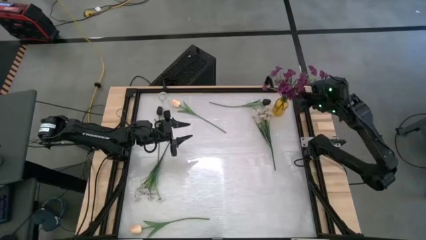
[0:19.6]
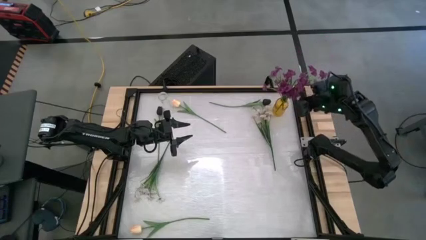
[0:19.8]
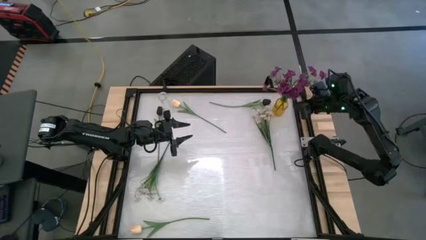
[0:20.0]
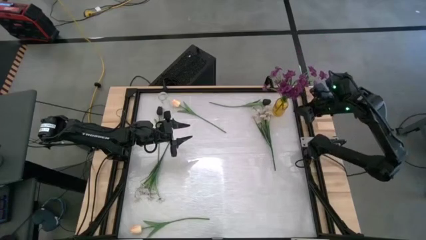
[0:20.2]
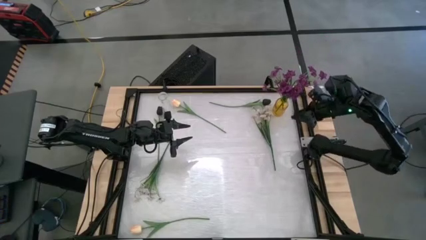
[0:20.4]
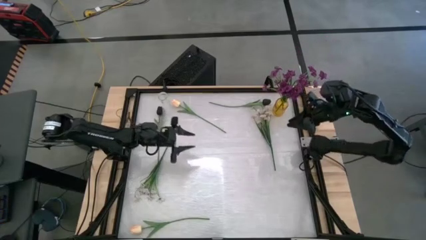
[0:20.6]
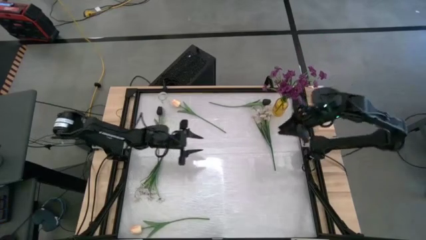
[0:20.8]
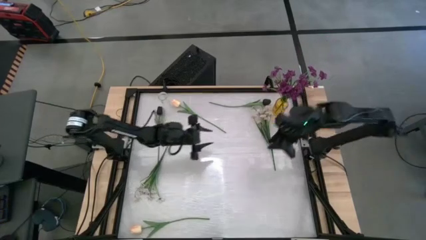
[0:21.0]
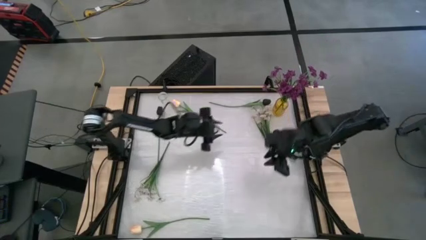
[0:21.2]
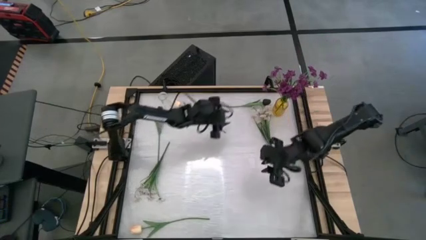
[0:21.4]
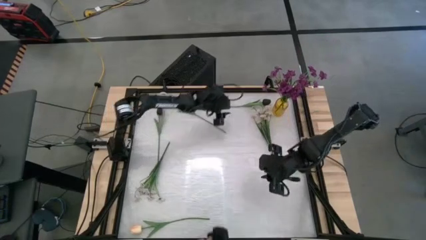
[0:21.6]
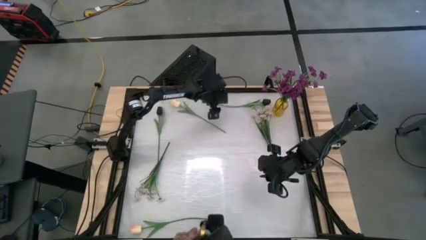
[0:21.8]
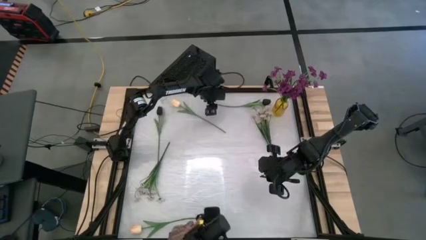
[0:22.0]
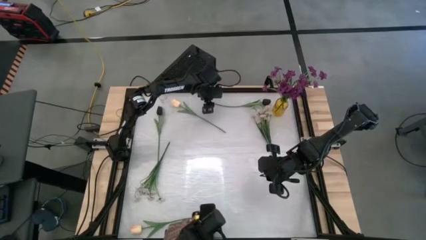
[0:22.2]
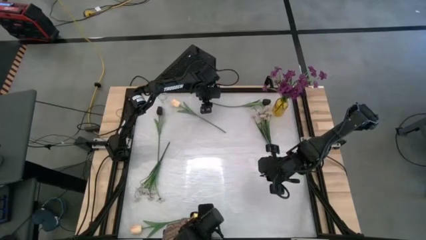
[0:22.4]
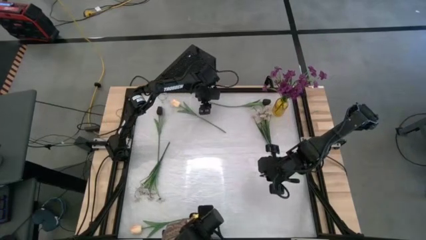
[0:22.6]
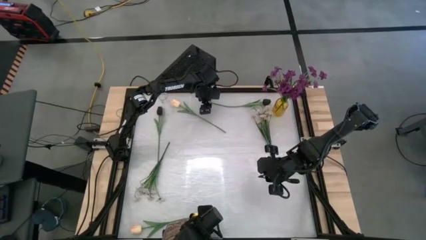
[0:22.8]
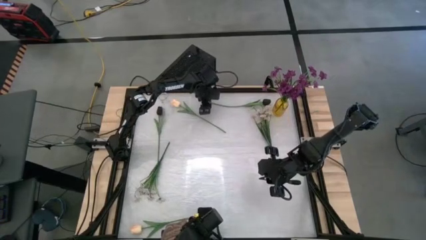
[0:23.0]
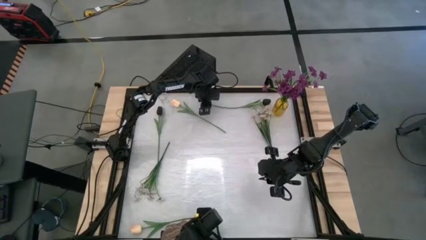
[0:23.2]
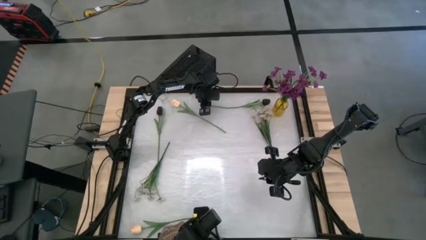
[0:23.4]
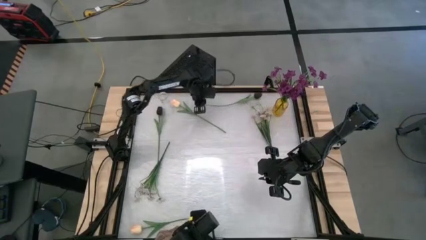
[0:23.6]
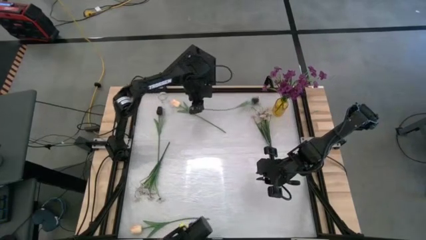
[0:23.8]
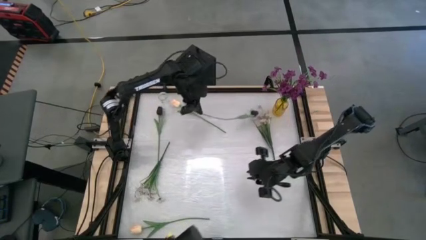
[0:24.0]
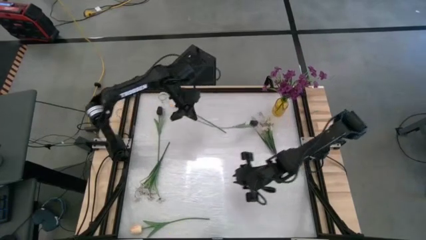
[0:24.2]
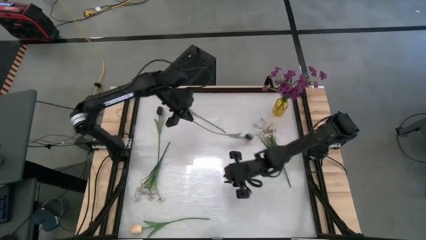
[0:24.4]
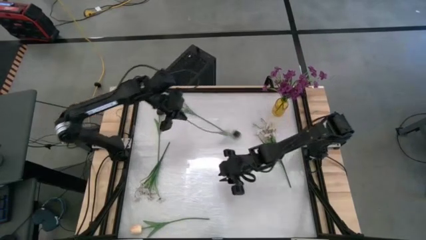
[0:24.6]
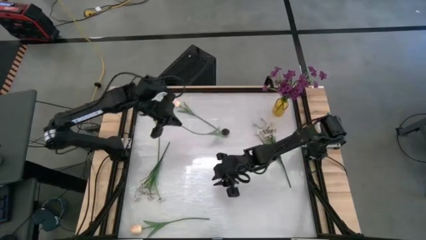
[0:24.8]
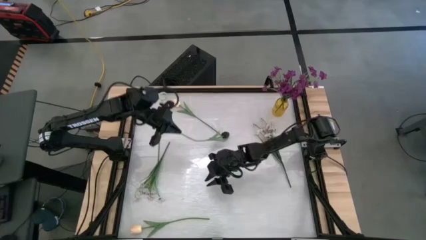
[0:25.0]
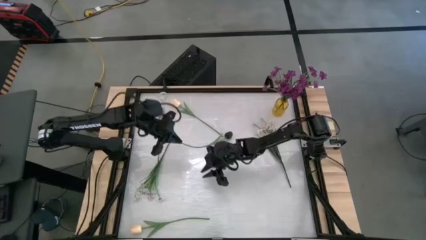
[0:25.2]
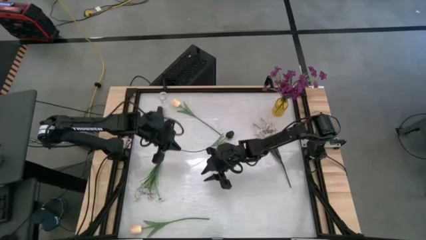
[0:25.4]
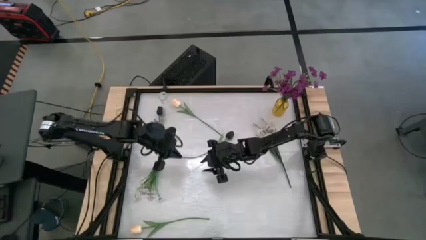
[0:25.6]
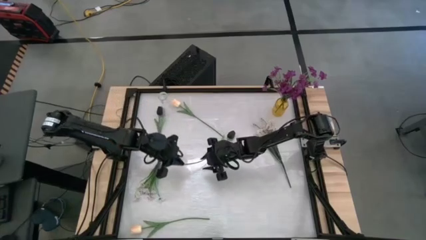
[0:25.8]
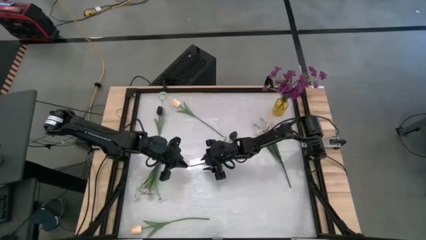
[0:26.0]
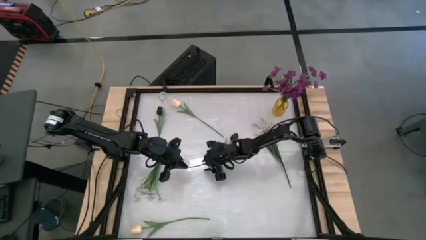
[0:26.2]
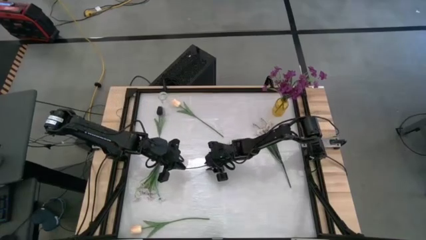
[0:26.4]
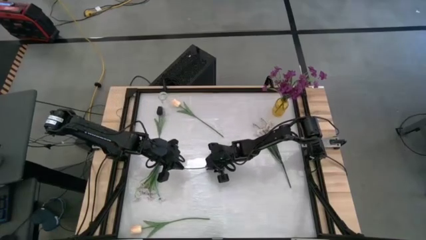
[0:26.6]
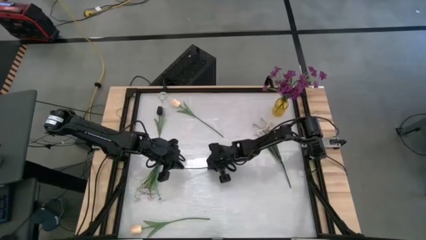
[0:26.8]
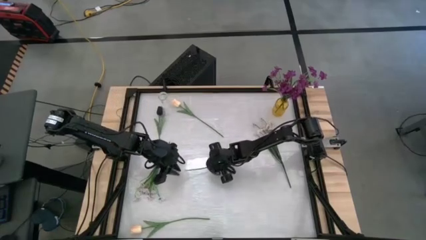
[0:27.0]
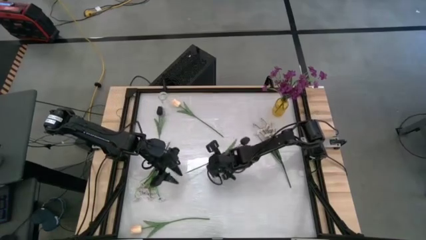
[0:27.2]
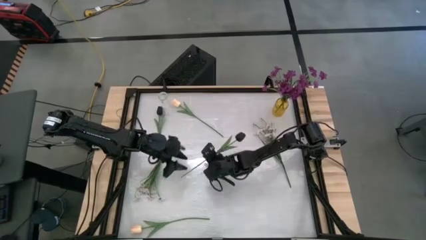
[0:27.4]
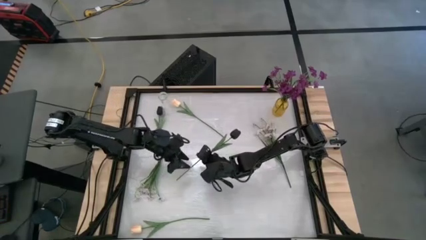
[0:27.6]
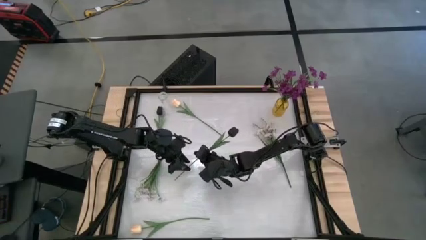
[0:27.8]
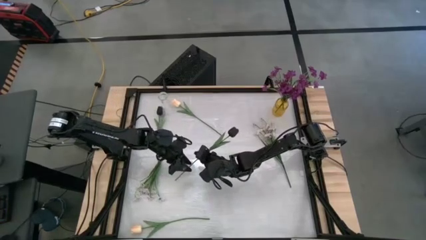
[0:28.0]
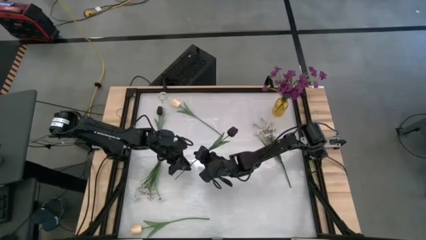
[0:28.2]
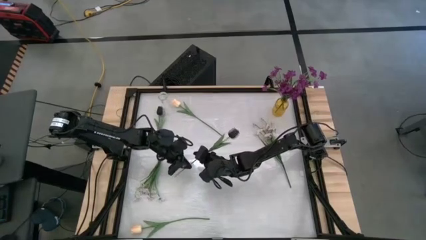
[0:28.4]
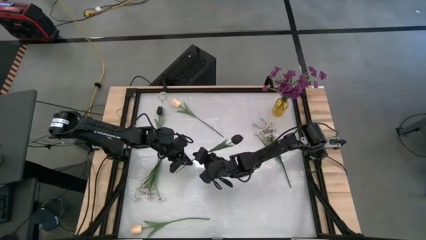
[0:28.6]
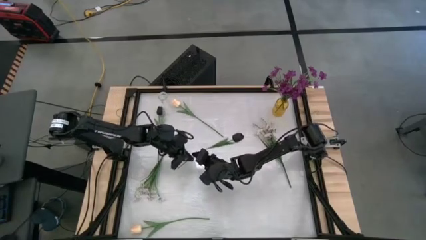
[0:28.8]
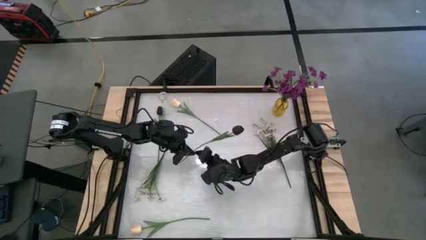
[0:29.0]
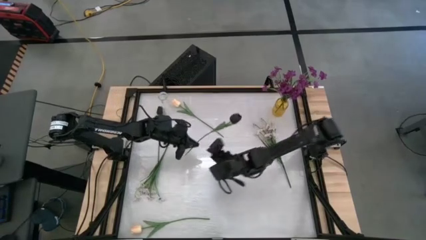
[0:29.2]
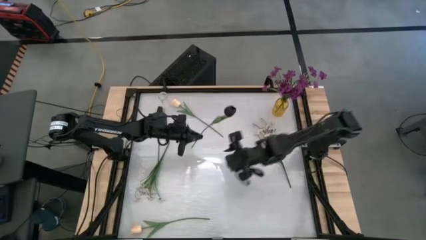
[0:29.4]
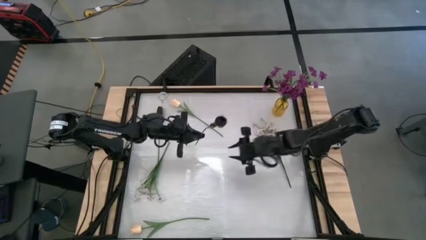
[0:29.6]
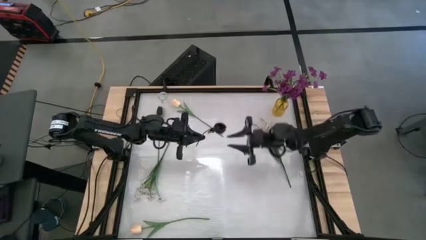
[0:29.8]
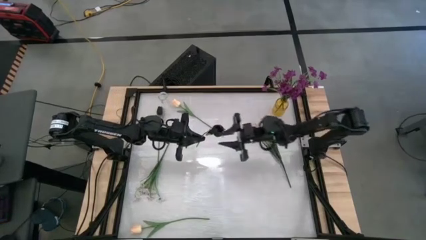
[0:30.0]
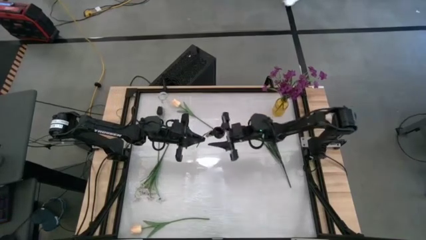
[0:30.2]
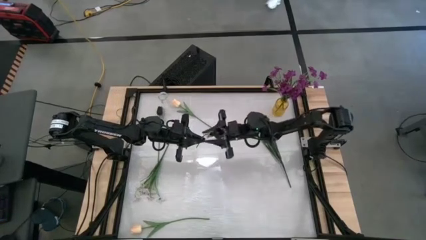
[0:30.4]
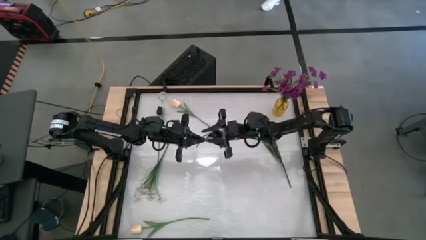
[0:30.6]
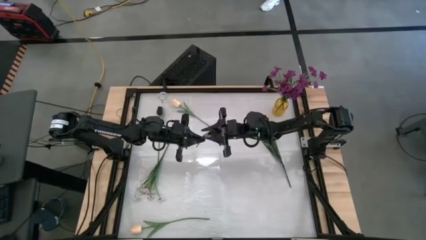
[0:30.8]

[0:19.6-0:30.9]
Task: Sort flowers into vase by color
Put the top black tulip into the yellow vase

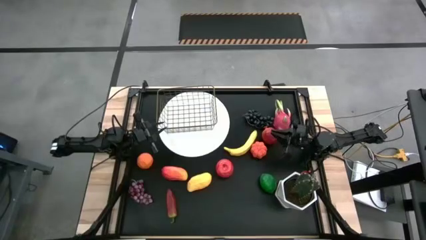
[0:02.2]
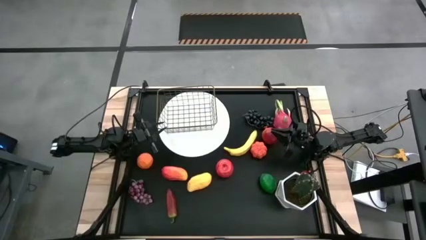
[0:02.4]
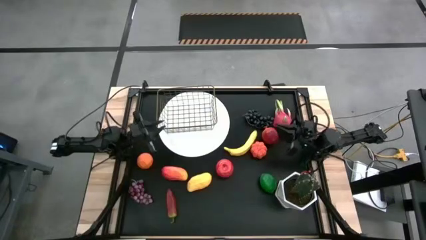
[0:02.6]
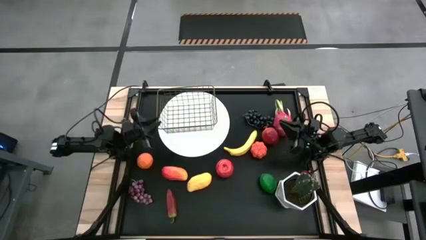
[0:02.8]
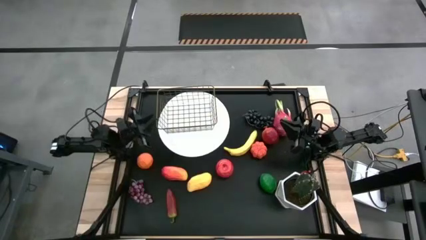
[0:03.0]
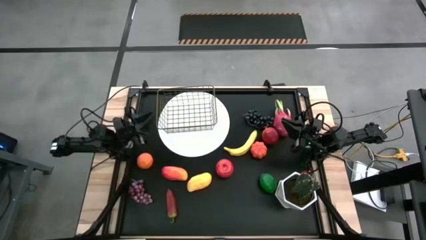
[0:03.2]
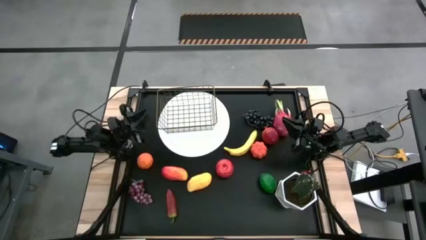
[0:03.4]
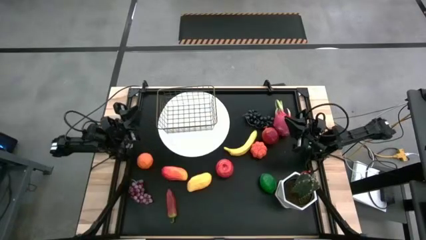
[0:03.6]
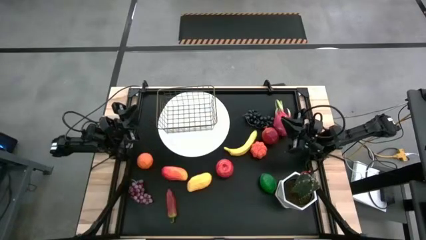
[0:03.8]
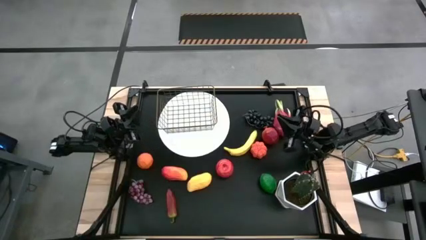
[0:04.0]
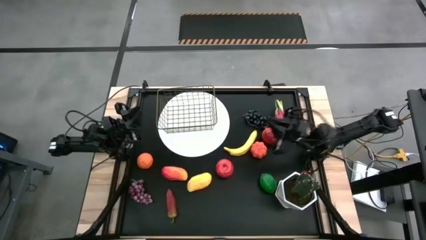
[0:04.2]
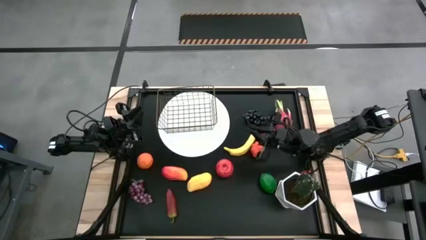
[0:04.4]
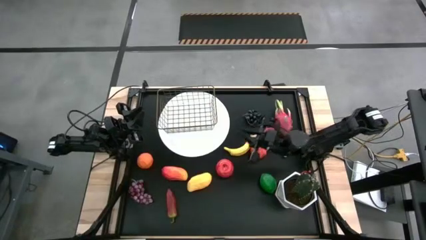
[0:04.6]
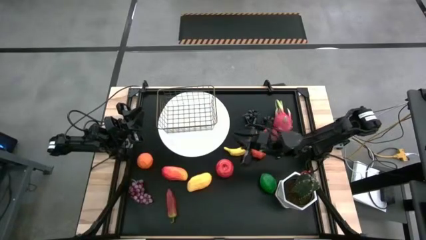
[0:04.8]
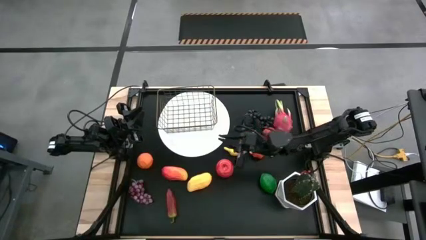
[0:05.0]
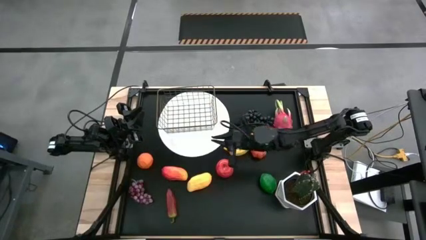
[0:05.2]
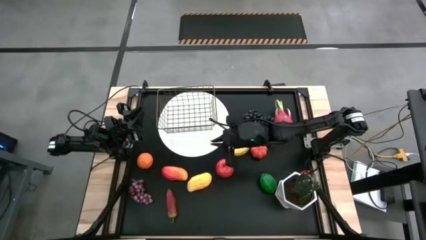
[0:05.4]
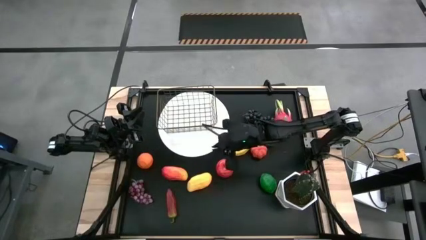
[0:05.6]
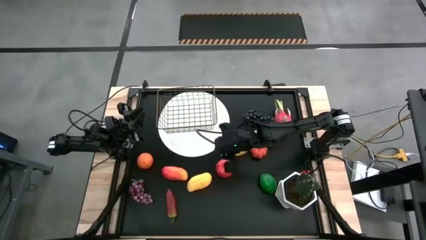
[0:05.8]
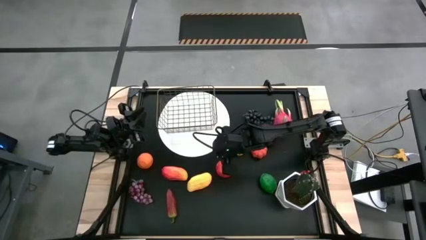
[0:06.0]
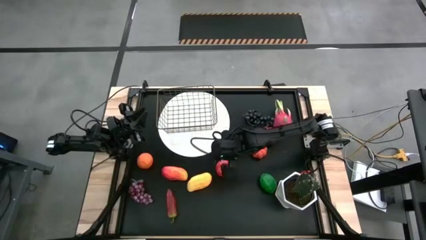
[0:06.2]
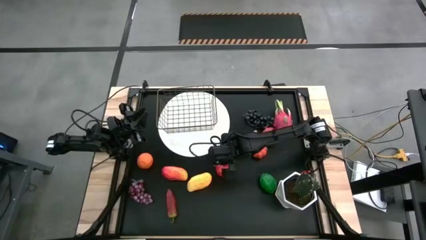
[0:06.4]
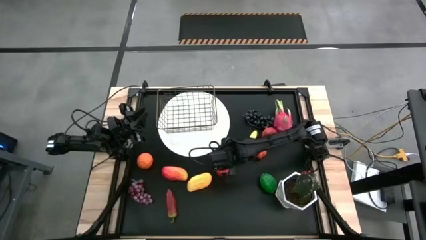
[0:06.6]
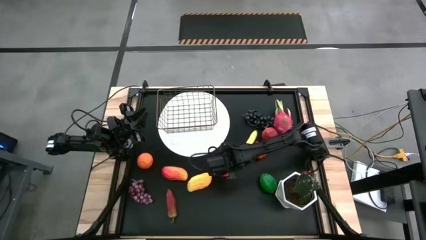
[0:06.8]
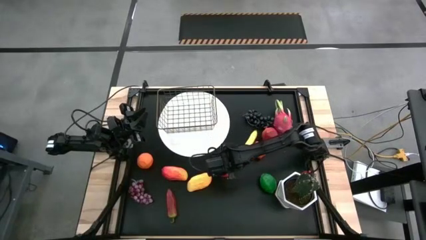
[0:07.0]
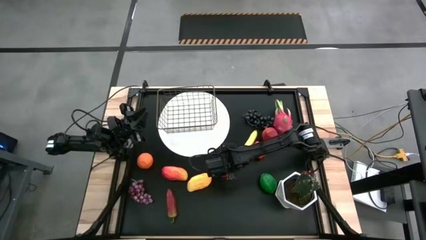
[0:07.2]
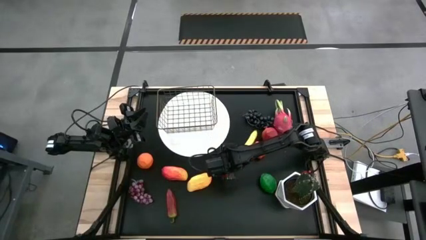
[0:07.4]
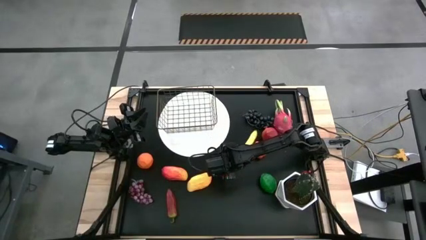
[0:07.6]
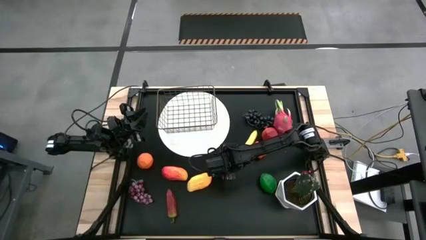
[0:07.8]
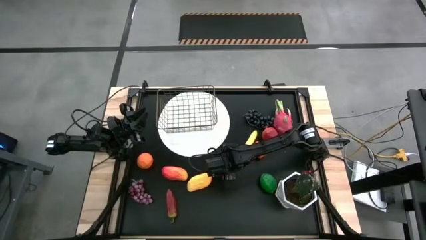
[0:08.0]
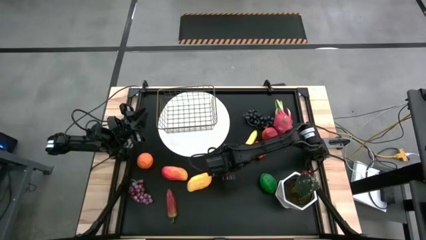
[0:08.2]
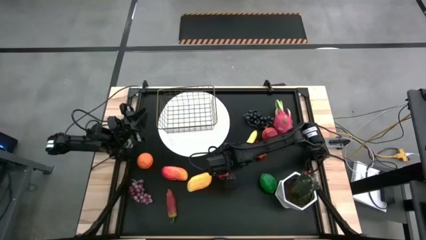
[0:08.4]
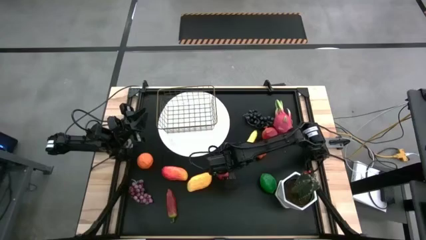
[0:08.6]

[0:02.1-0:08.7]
Task: Build produce basket
Put the red apple into the wire basket
